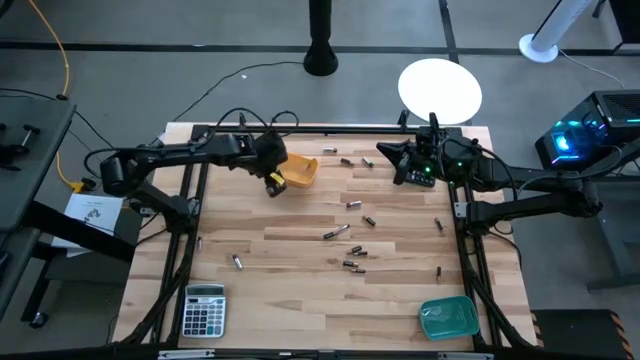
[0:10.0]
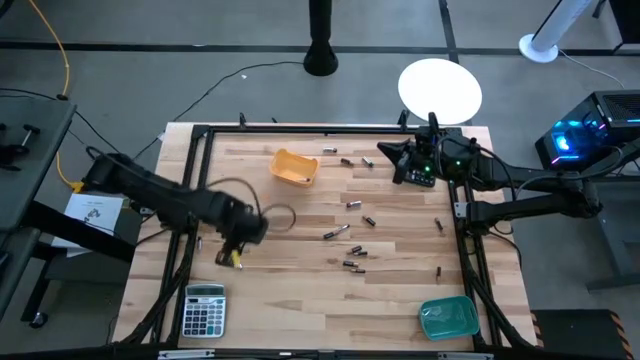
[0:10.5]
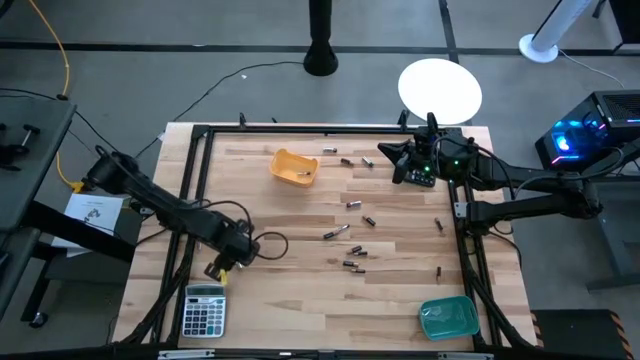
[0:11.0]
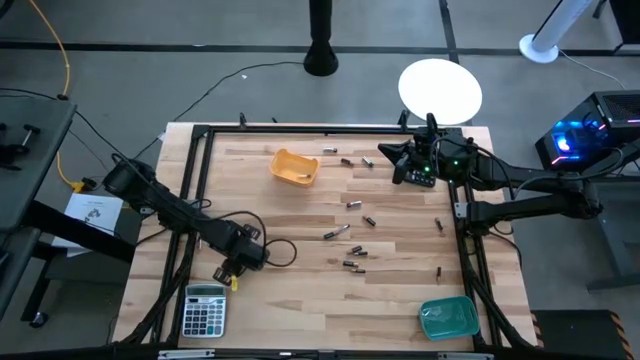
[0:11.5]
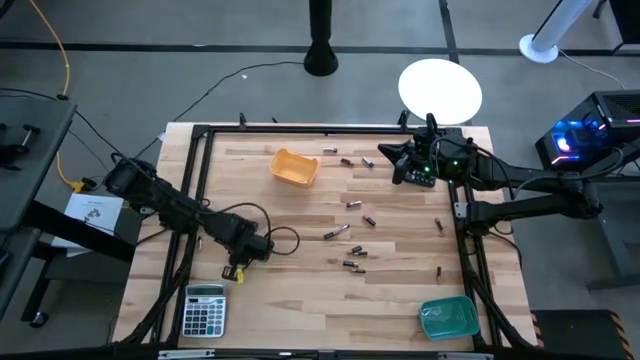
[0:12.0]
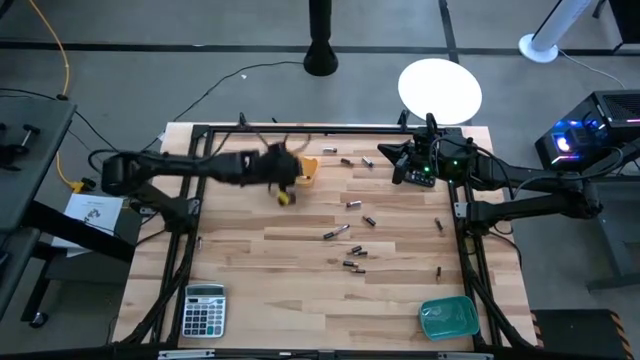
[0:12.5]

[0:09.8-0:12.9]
Task: Sort batteries
Put the silver battery into the yellow bin

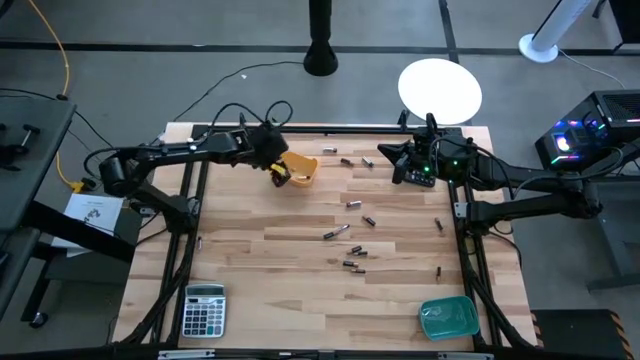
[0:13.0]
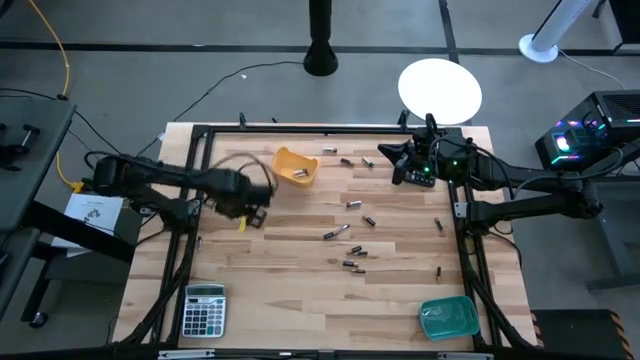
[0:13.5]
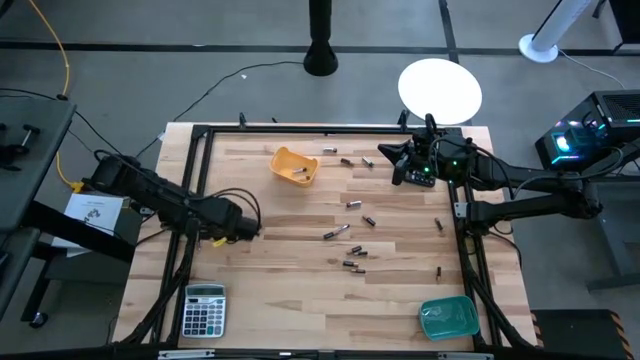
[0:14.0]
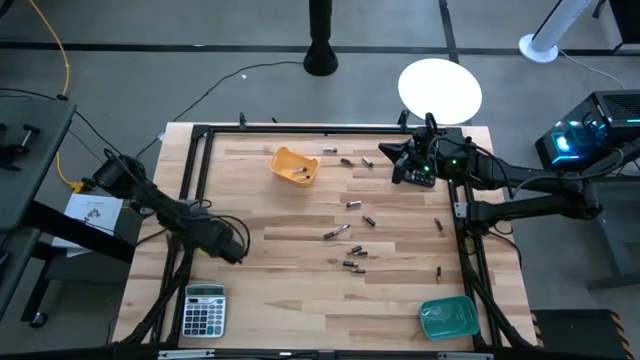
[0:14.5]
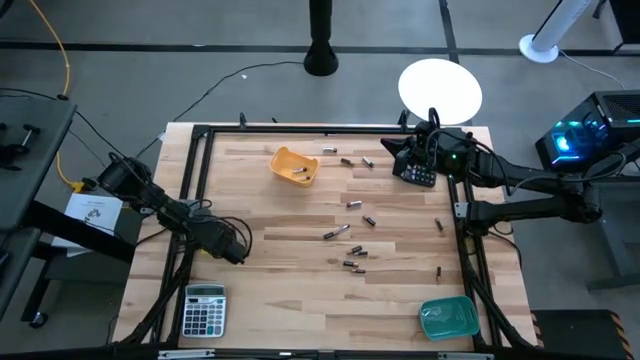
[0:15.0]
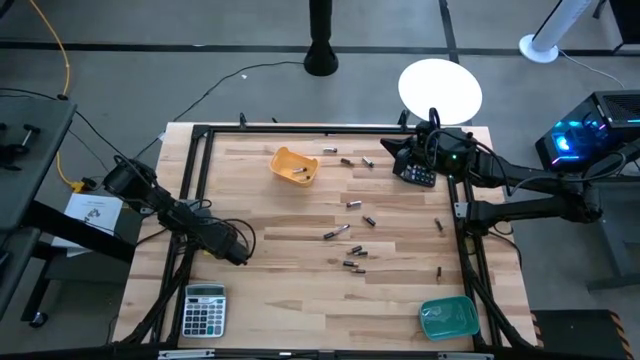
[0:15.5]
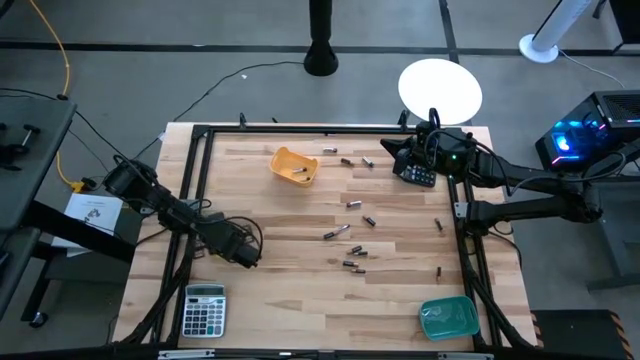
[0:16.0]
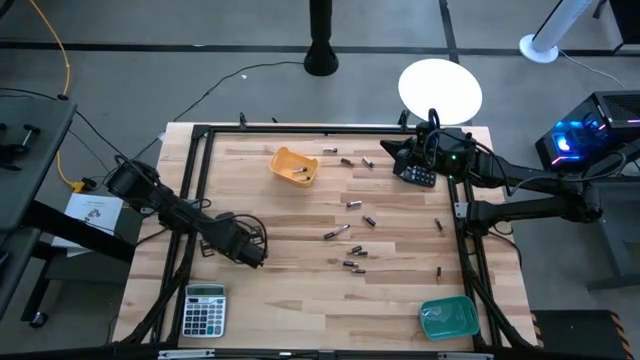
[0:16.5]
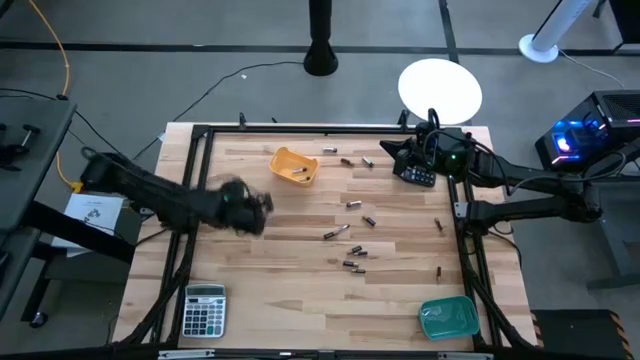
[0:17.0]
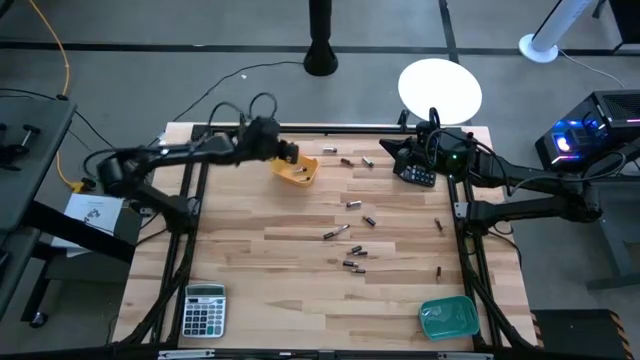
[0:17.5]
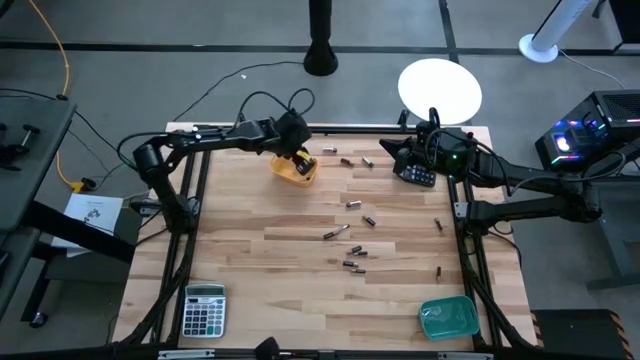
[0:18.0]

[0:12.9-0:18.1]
Put the silver battery into the yellow bin

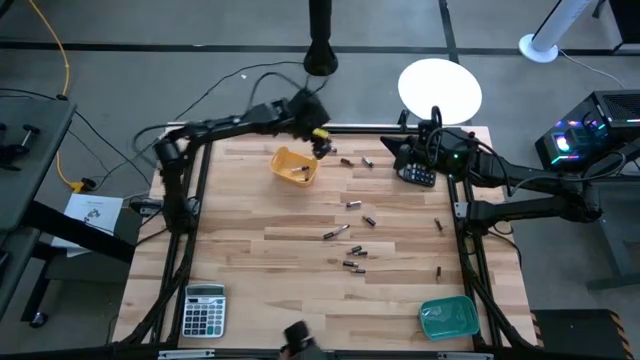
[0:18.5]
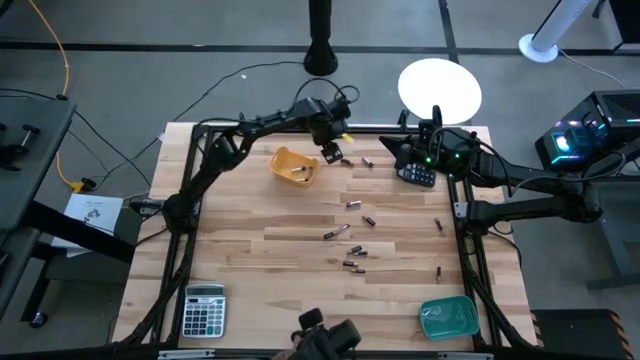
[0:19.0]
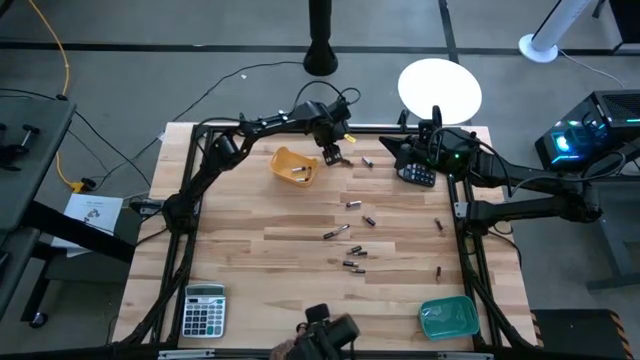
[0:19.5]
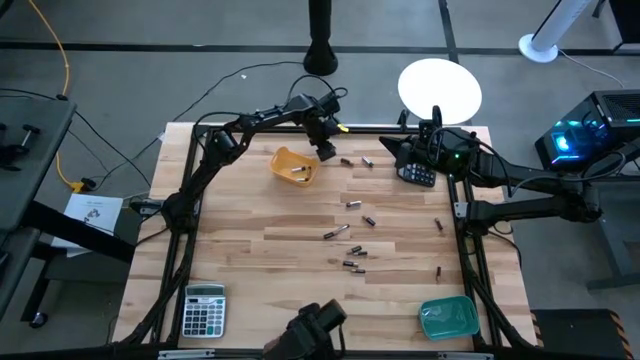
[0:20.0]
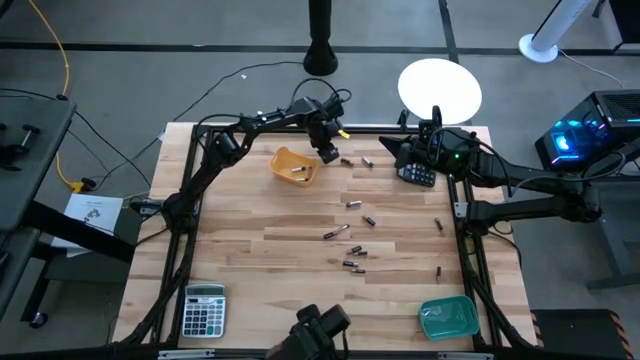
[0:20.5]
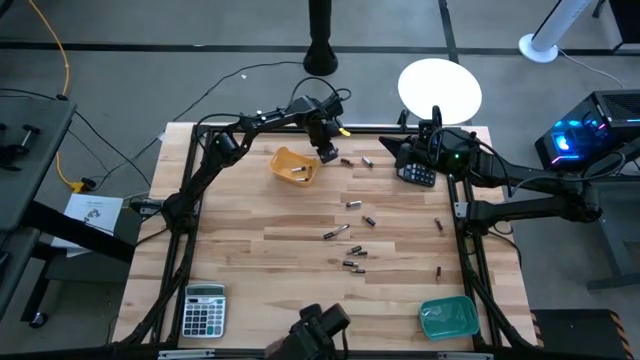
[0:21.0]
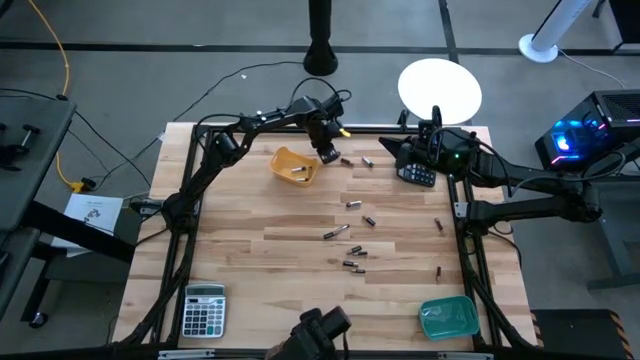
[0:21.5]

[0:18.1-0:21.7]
Put the silver battery into the yellow bin

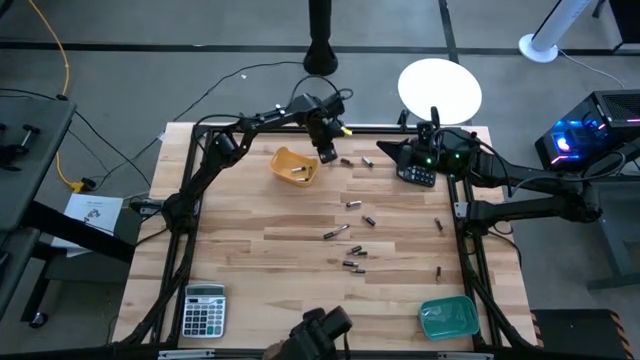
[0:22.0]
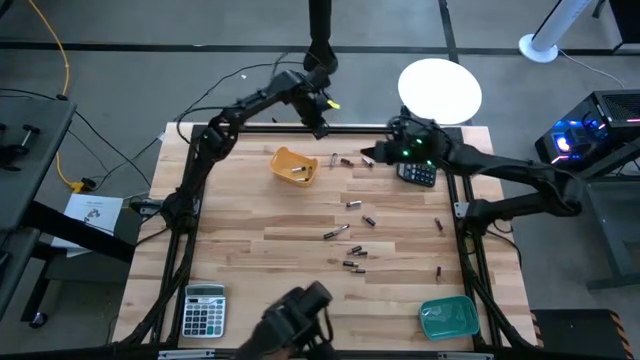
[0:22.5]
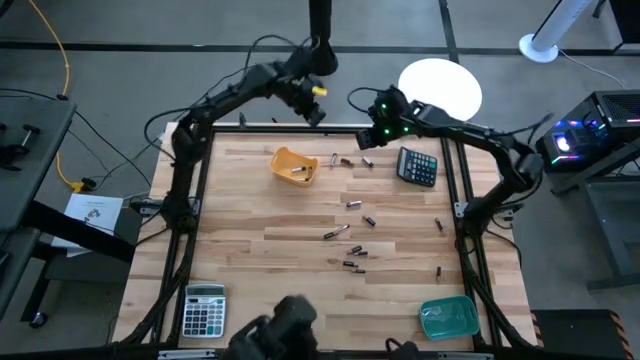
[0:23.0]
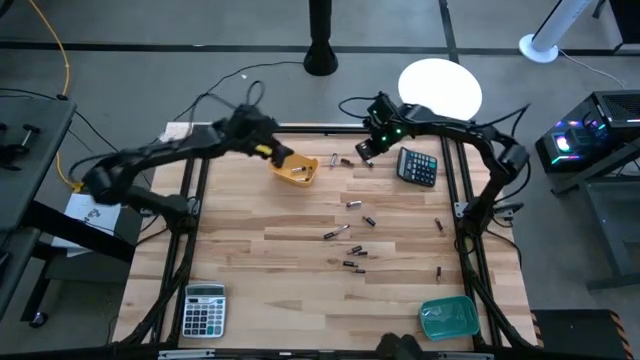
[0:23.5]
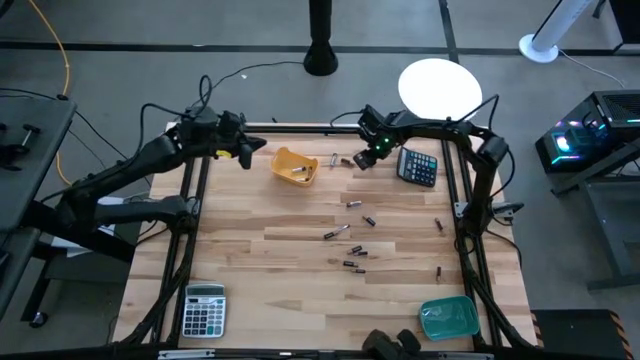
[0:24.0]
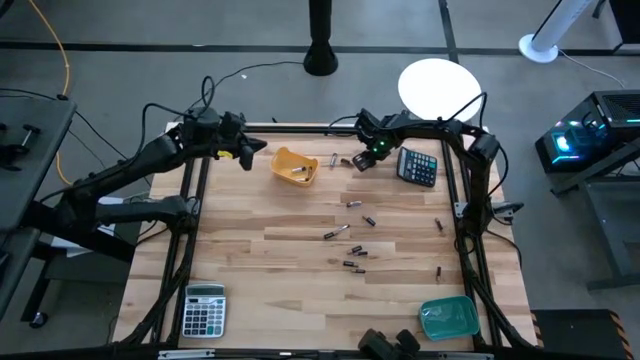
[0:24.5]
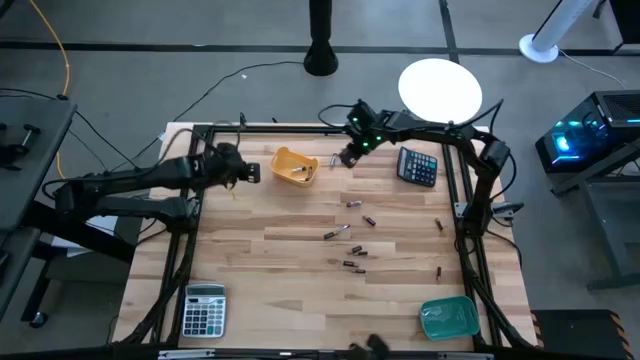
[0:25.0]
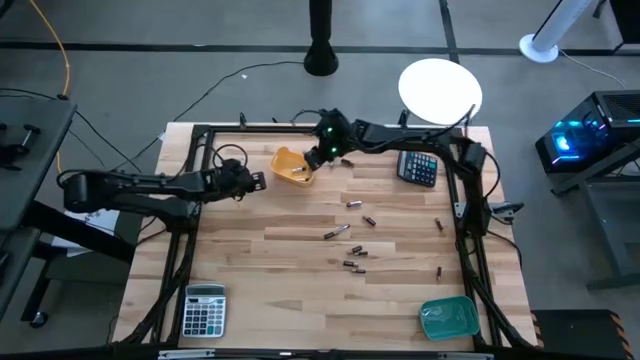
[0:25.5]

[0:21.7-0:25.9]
Put the silver battery into the yellow bin

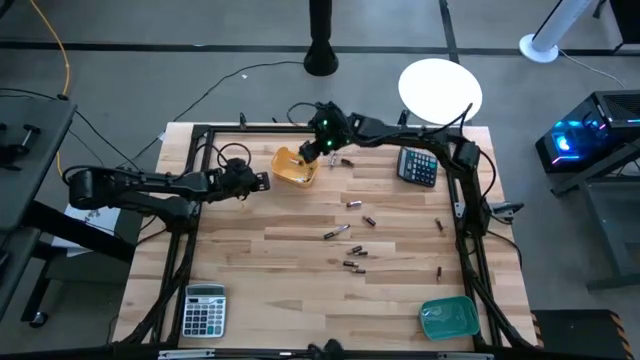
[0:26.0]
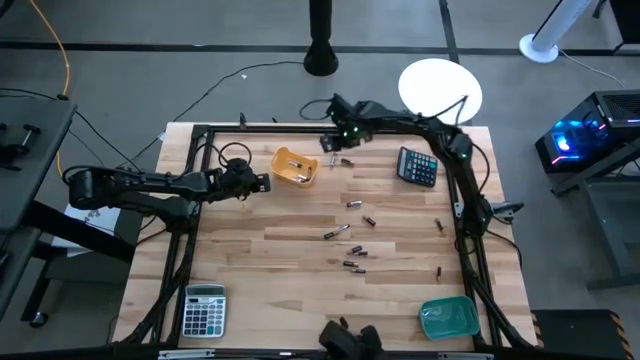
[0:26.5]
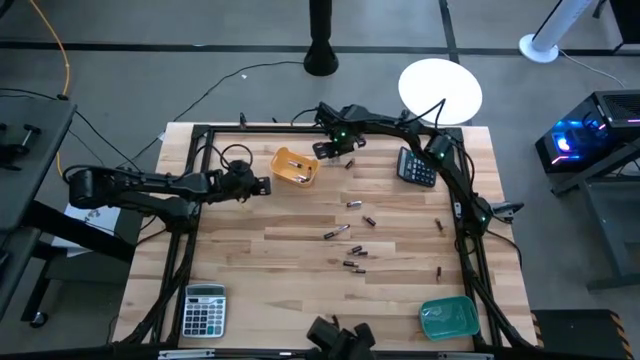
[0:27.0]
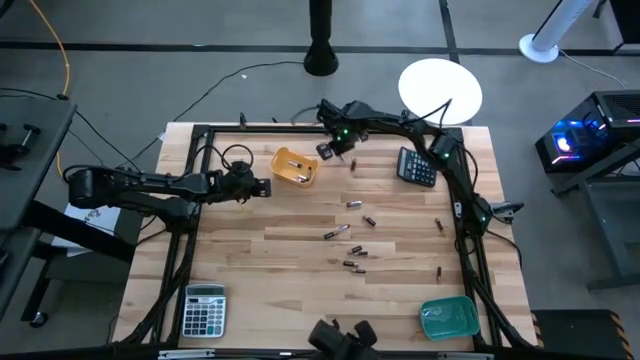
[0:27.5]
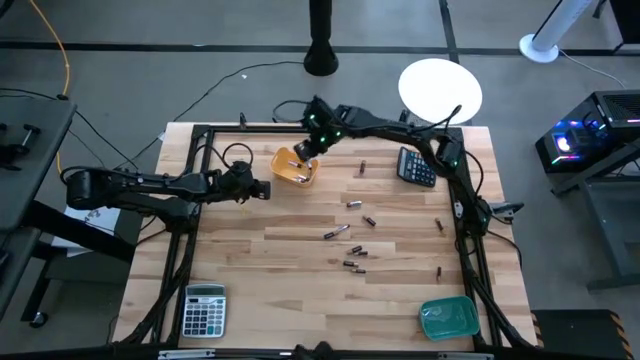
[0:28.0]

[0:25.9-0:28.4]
Put the silver battery into the yellow bin
